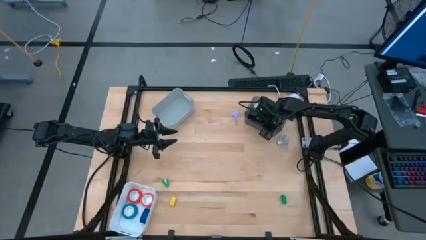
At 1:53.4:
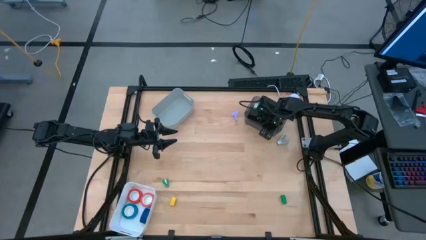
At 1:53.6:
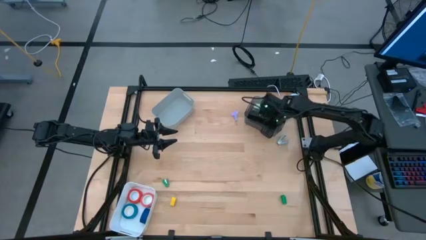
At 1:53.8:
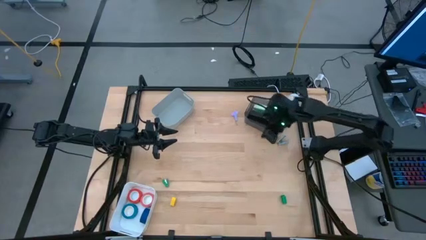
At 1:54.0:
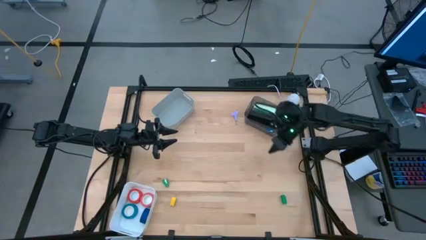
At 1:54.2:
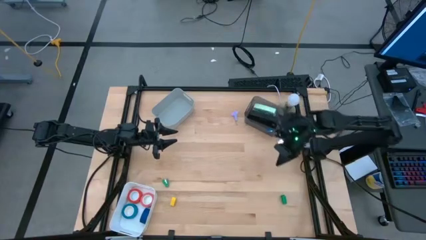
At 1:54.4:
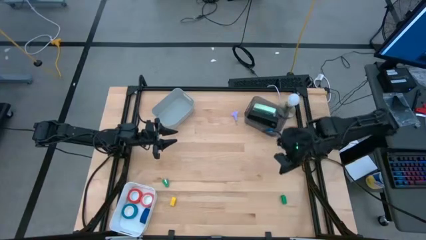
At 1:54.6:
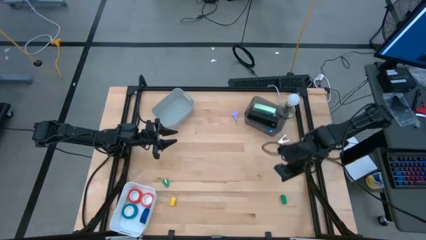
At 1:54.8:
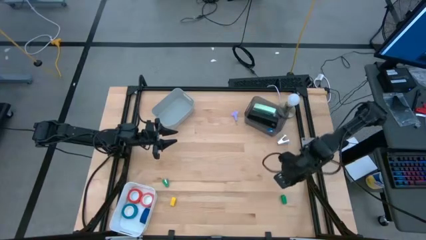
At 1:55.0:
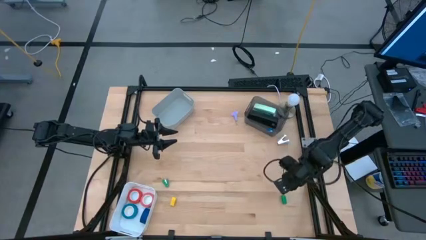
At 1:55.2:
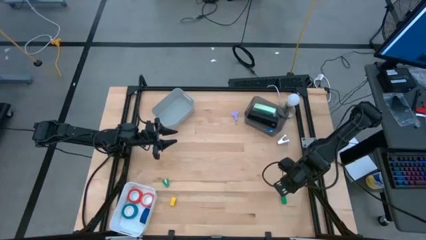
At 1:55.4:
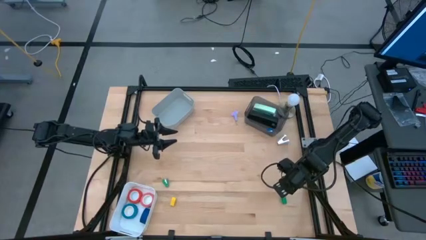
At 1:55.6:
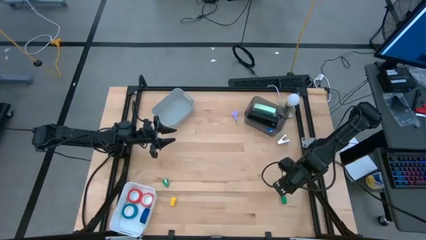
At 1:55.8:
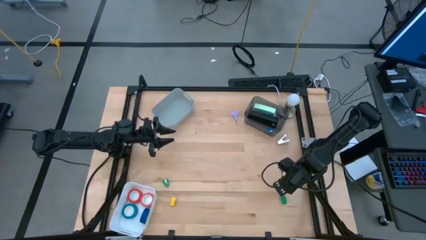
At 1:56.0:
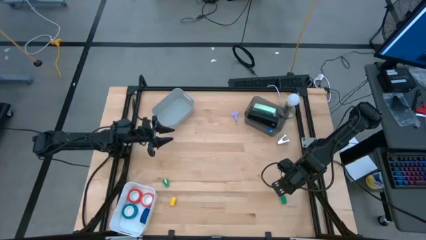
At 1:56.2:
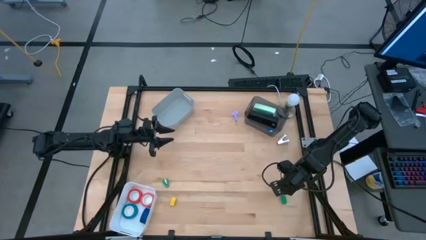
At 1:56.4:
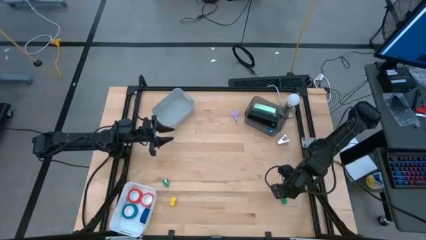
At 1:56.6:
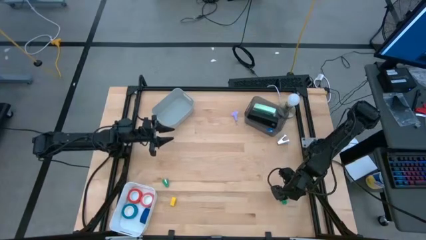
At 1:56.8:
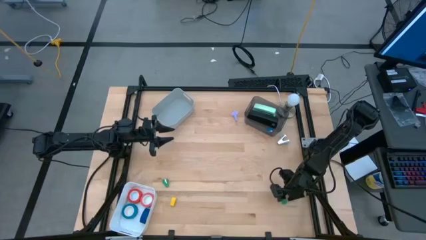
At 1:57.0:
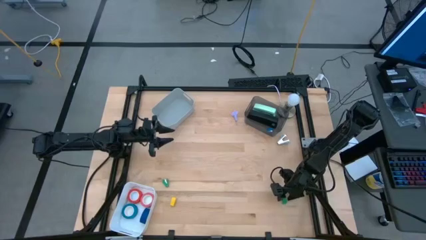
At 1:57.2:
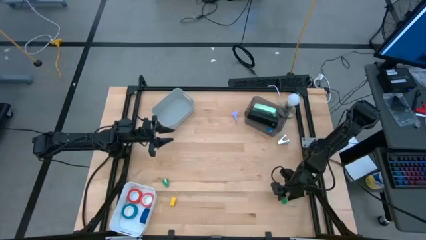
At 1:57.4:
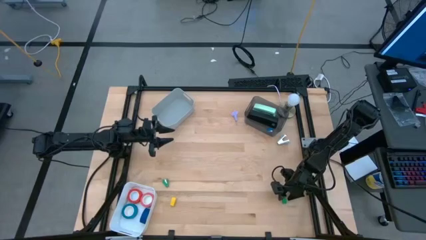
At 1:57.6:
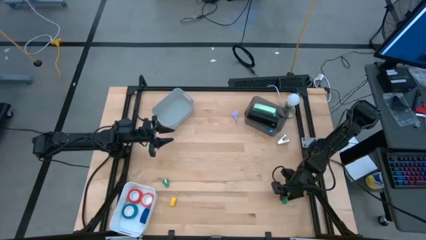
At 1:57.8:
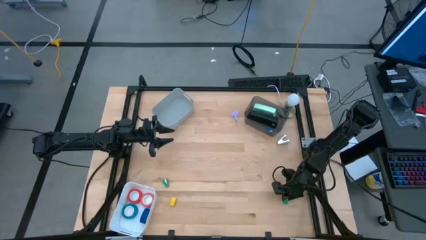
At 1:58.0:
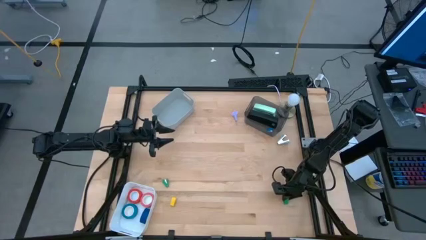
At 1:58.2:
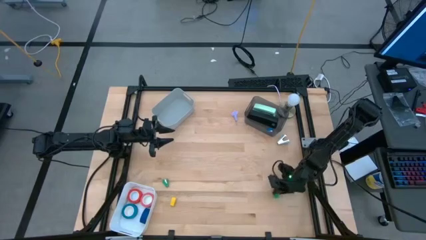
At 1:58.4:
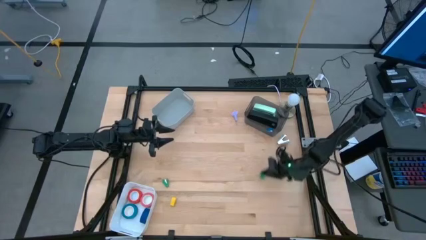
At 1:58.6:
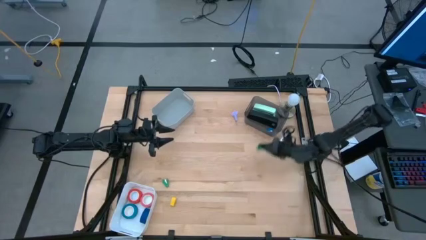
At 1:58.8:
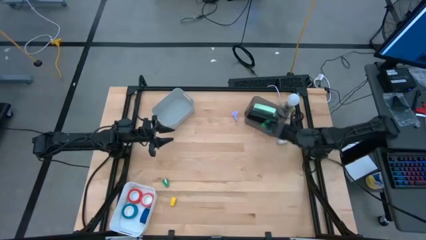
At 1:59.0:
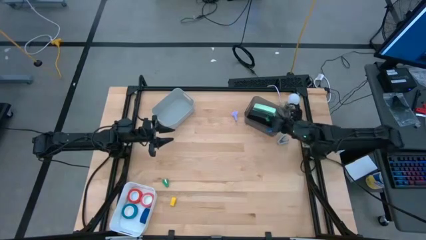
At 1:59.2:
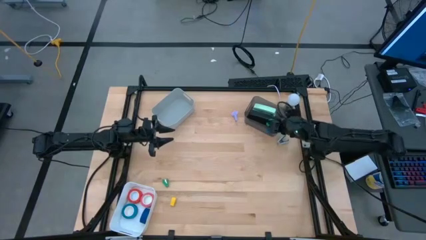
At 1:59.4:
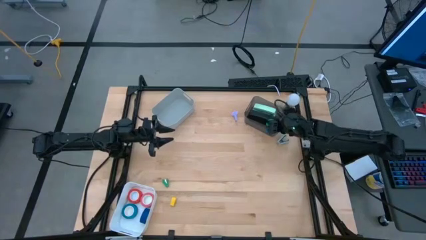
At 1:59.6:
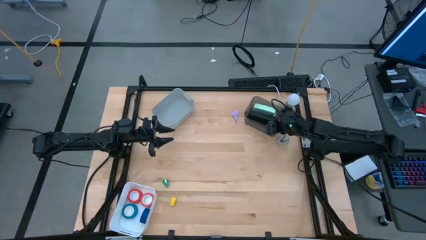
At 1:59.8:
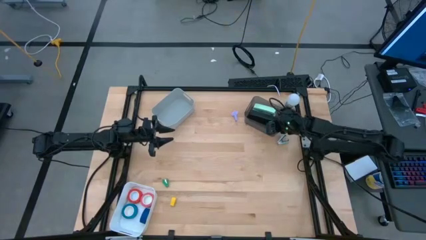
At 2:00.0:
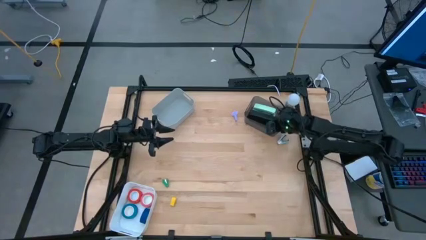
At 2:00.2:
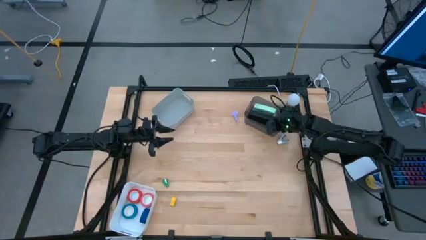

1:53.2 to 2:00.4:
Task: Pick and place Stapler, Stapler remover, tape
Put the small right green stapler into the black bin

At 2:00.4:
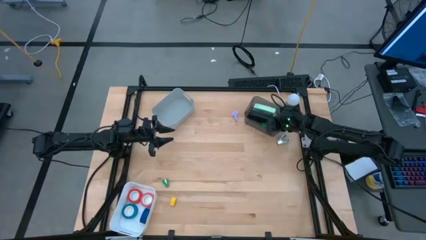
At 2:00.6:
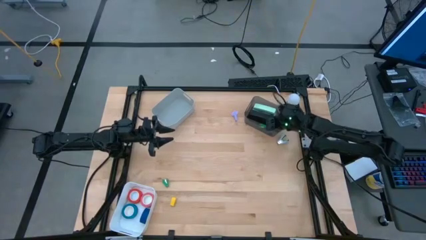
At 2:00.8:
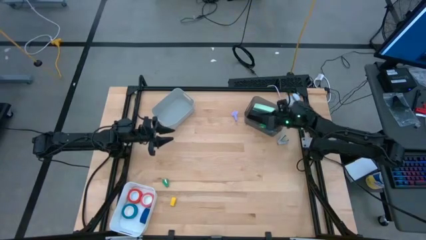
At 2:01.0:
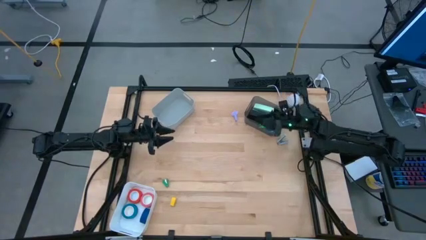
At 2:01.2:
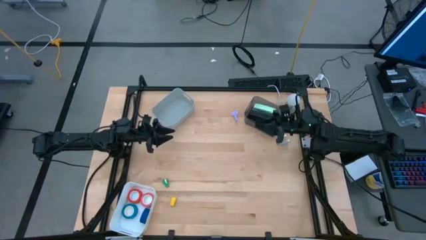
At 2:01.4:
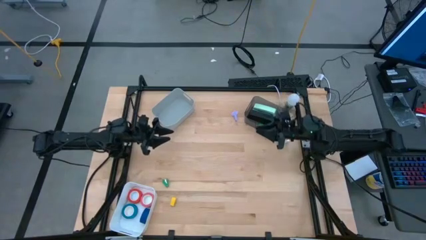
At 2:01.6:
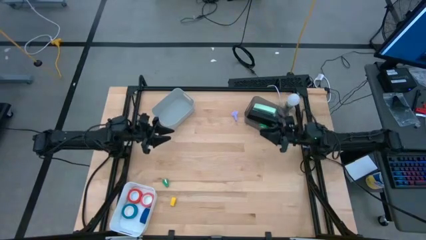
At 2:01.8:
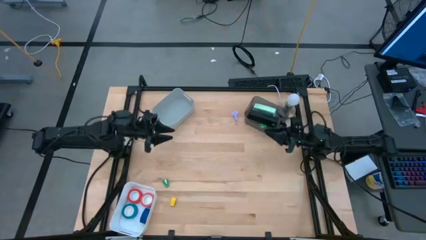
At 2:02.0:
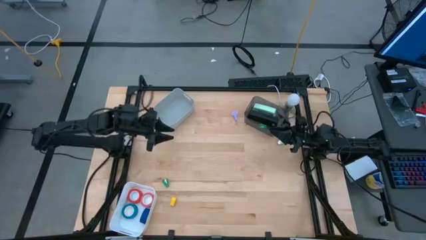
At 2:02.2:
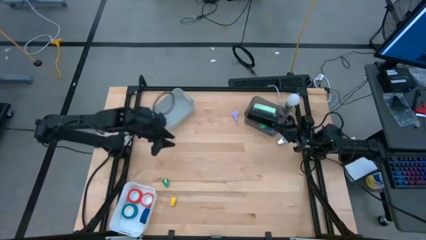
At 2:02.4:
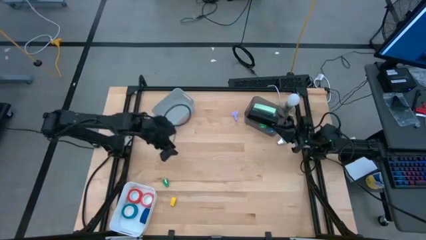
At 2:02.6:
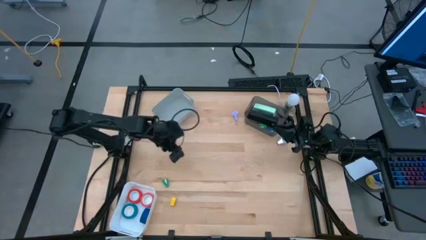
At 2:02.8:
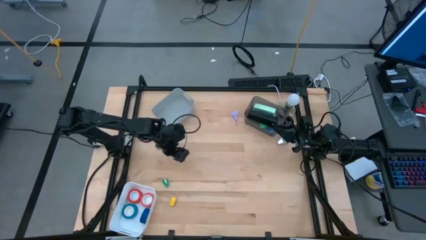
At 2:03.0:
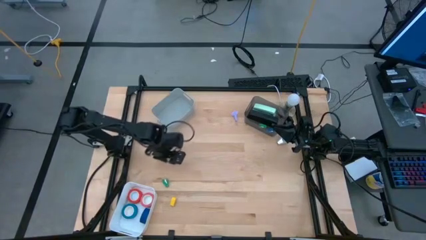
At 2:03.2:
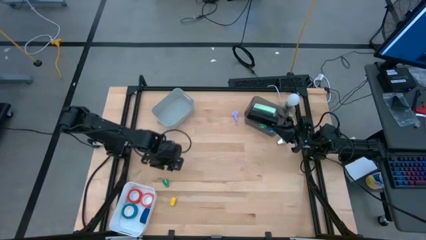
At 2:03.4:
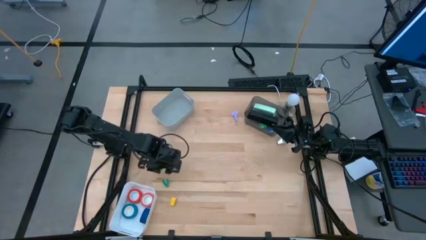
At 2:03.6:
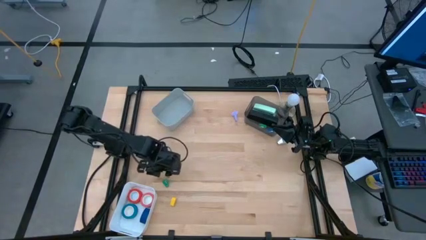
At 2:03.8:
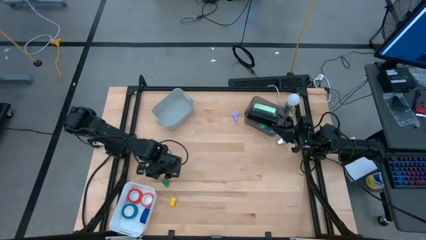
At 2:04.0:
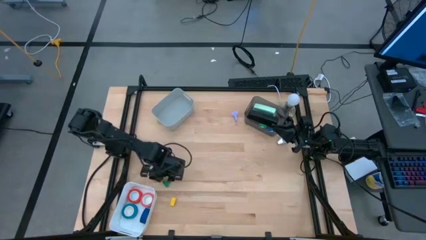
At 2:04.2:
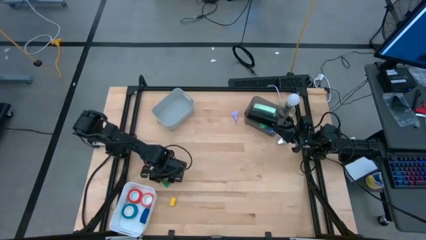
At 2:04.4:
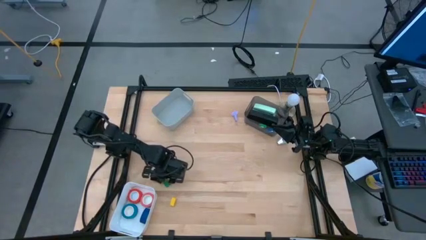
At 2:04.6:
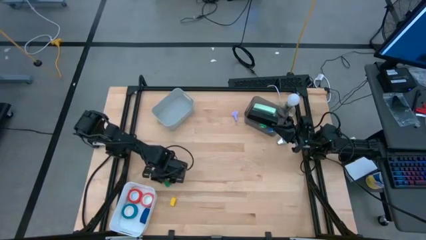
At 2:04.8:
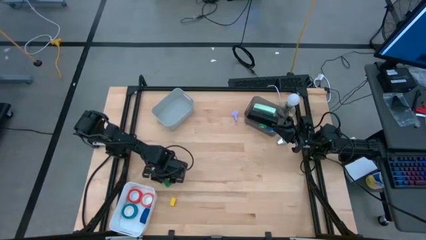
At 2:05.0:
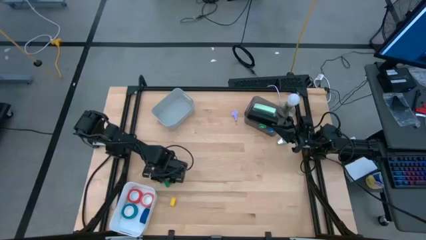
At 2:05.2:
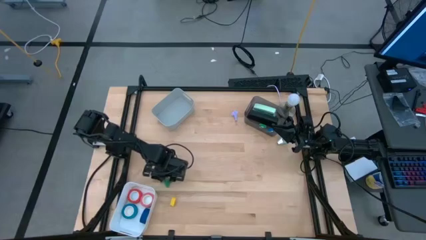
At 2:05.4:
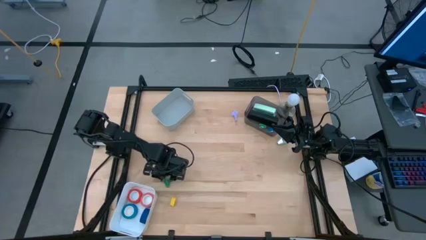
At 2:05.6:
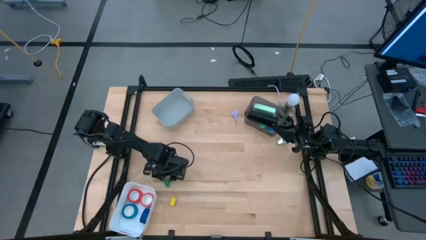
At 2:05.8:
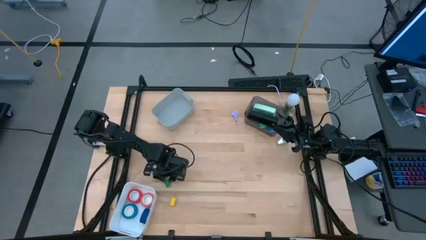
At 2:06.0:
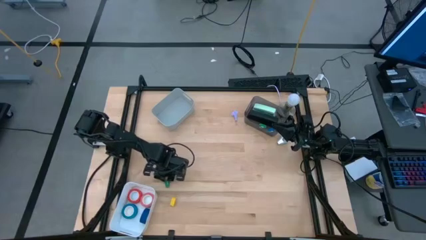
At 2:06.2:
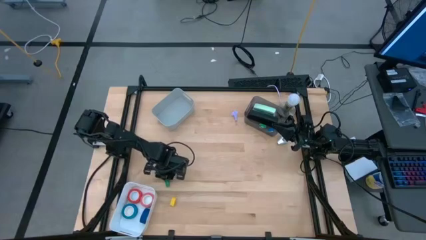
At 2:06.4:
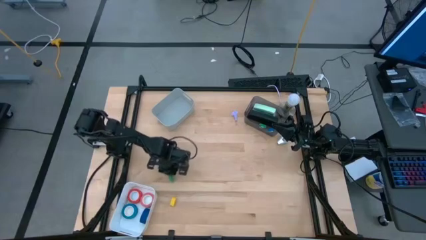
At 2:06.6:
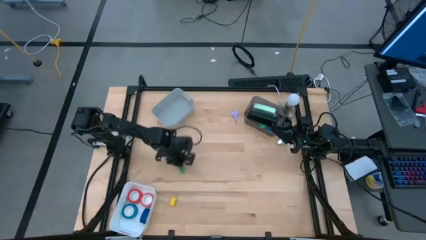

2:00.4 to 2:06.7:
Put the small green stapler into the black bin
